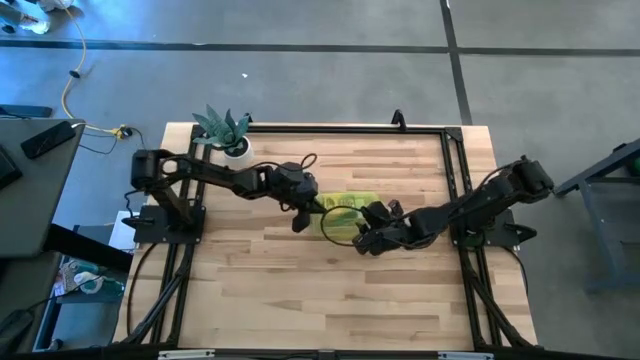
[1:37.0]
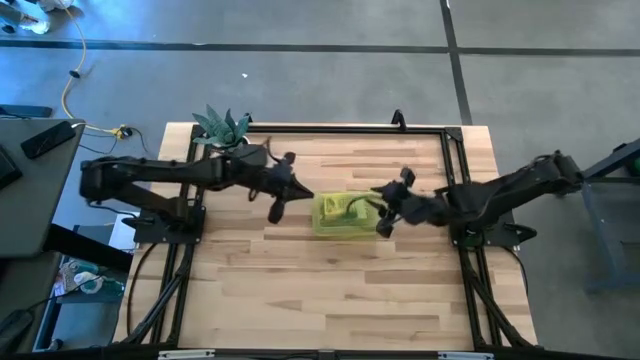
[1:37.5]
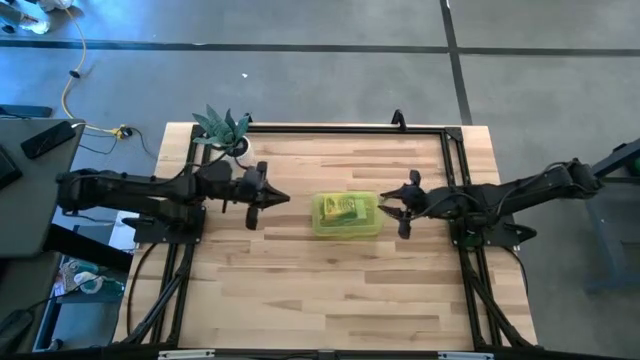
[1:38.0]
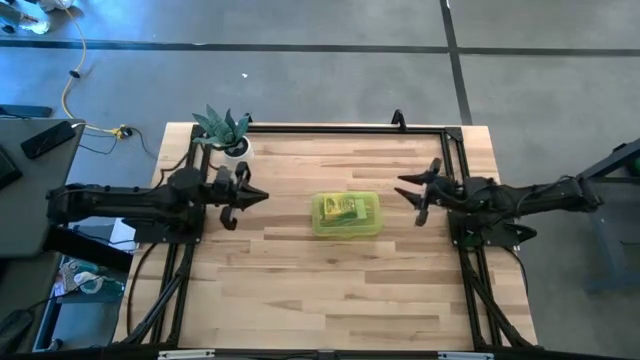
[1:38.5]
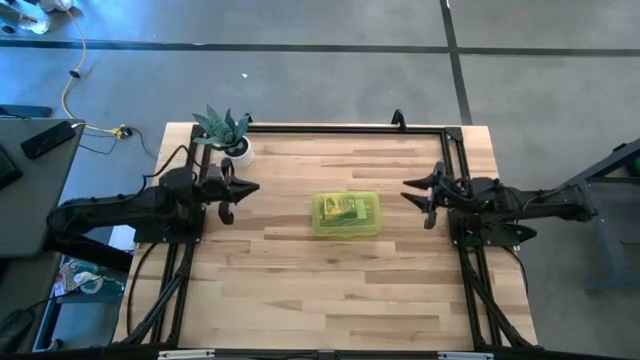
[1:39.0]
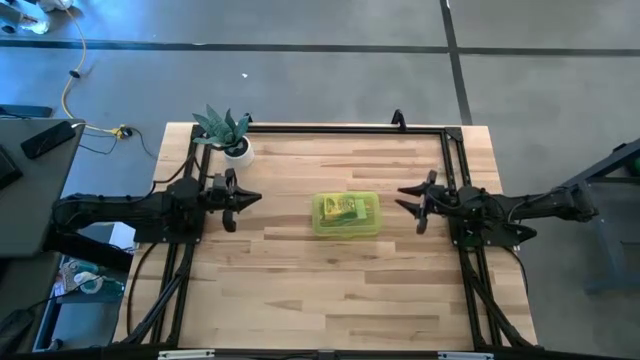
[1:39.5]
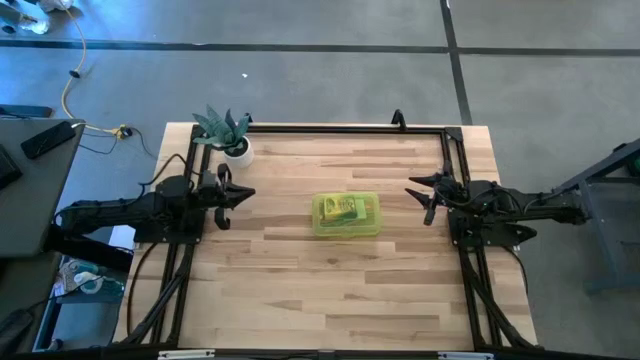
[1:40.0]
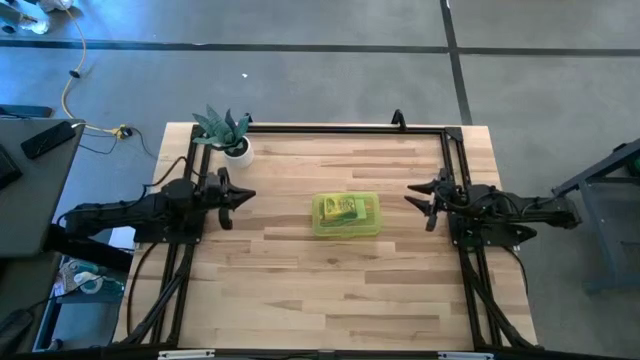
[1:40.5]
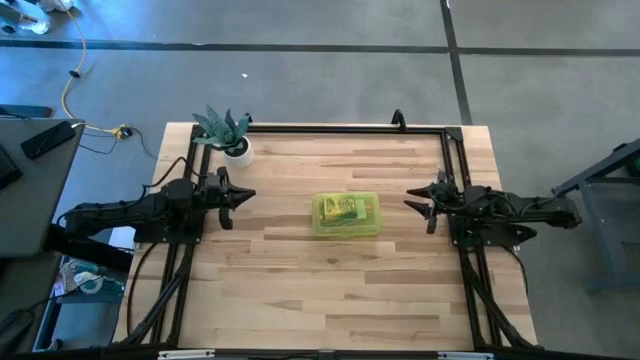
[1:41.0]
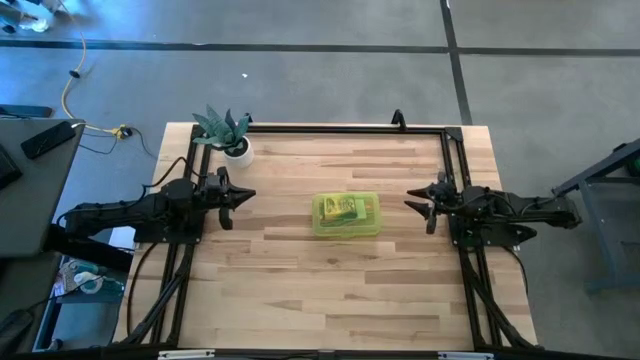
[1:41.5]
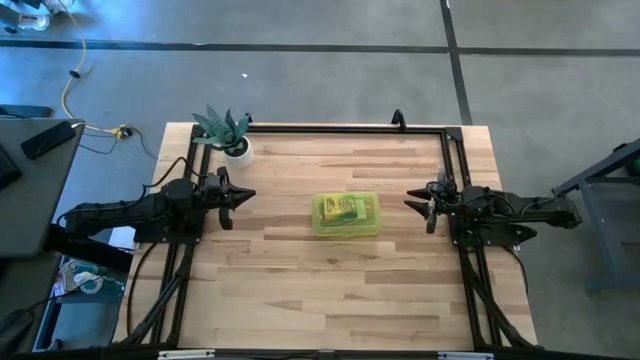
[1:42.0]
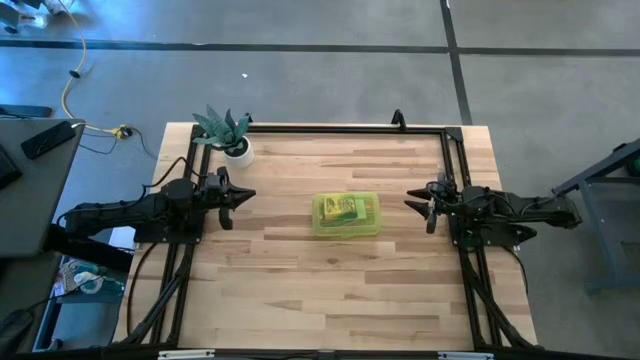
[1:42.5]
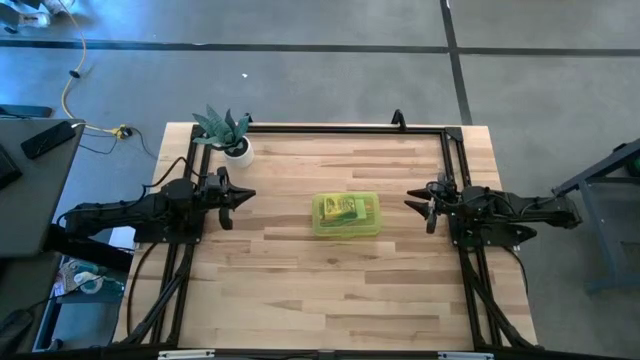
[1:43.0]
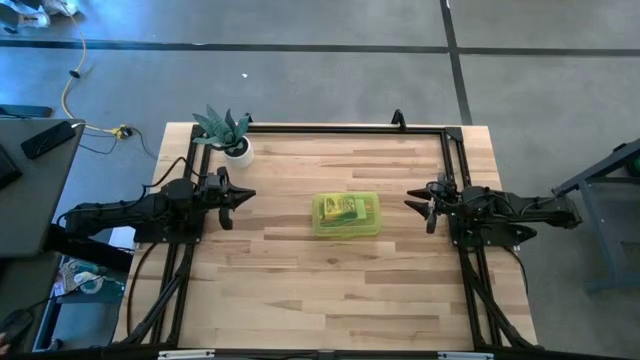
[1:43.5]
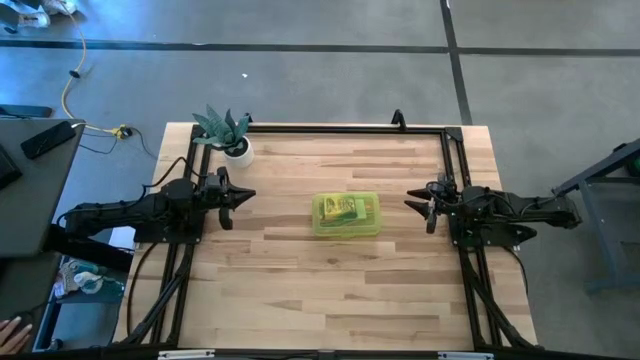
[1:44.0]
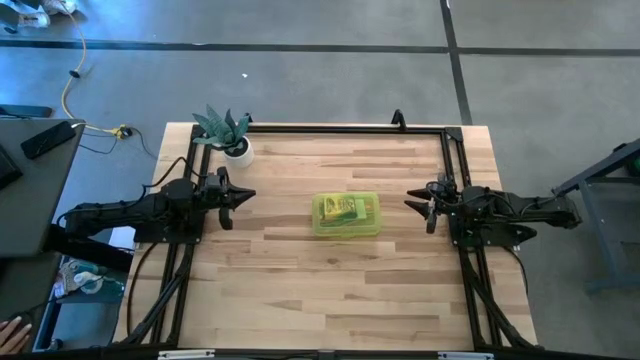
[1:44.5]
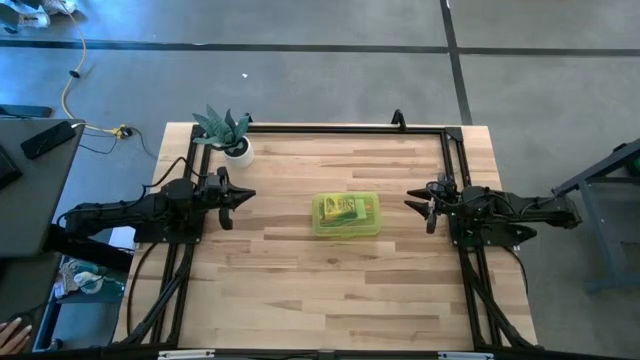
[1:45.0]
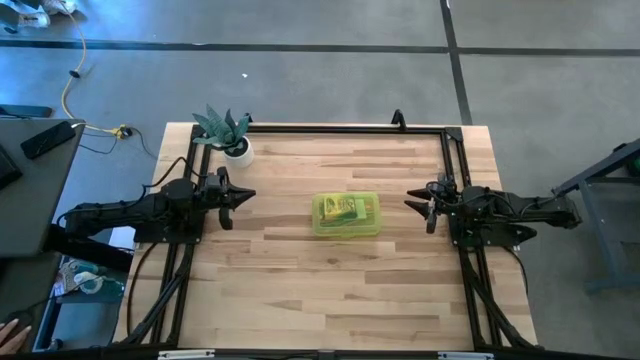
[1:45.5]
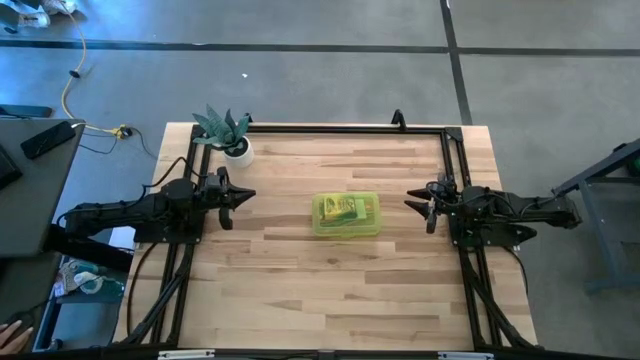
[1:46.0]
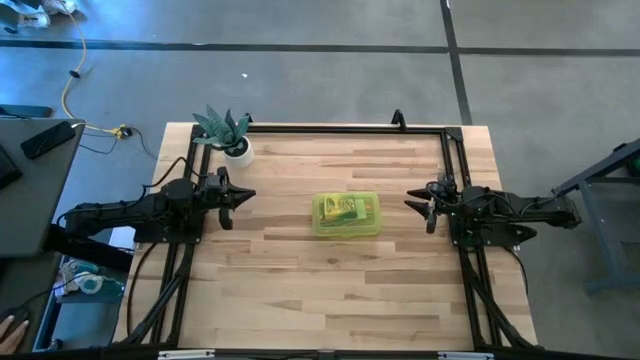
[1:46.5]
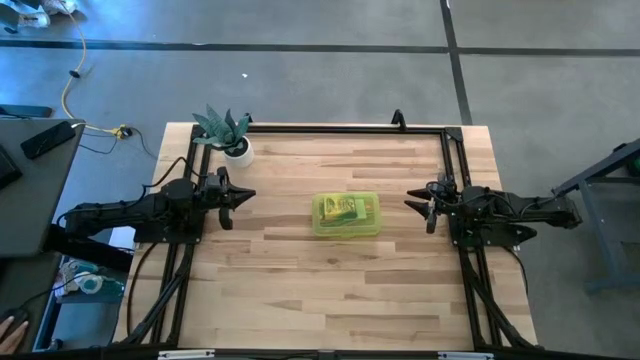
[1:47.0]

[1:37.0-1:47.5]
Task: Pack school essentials
Return to Home Position

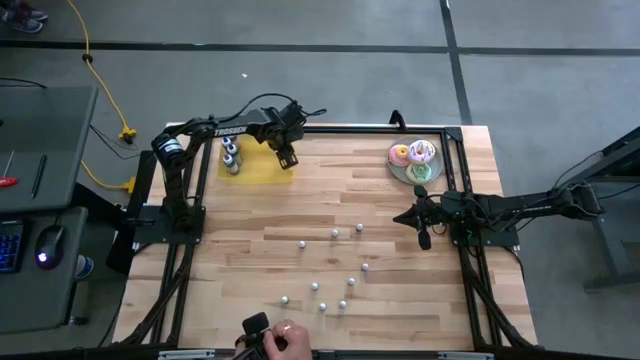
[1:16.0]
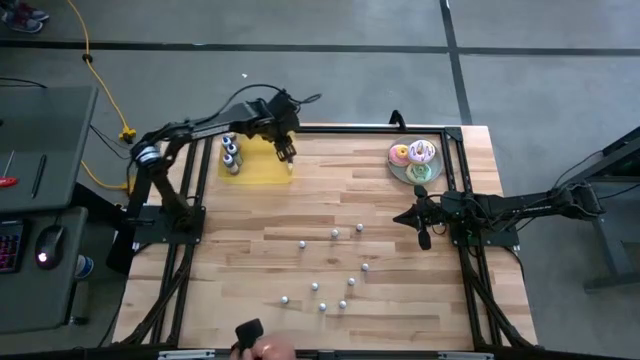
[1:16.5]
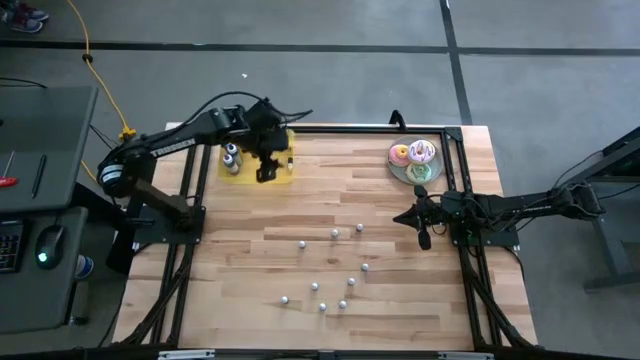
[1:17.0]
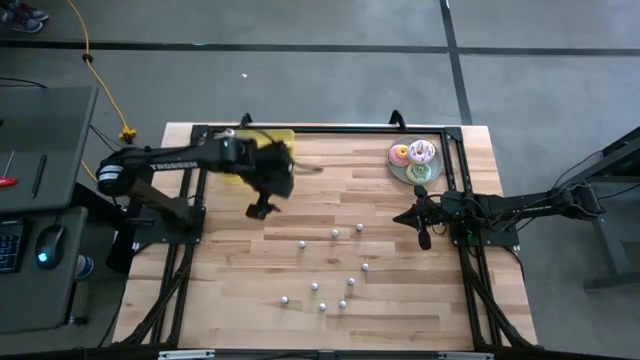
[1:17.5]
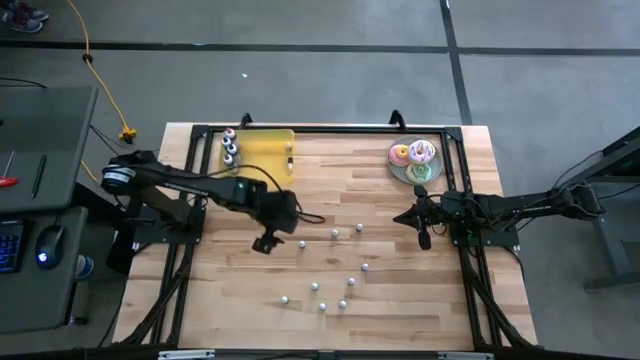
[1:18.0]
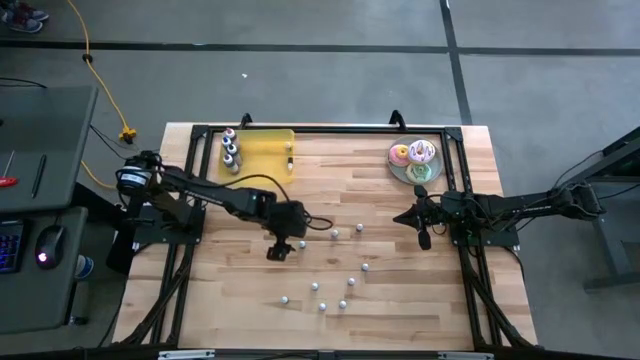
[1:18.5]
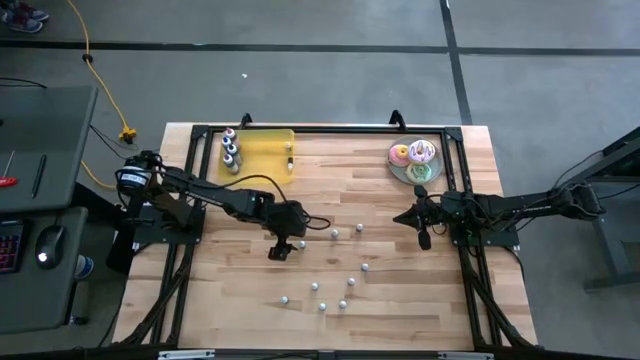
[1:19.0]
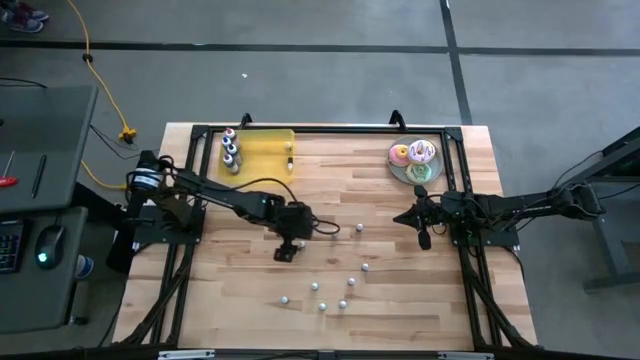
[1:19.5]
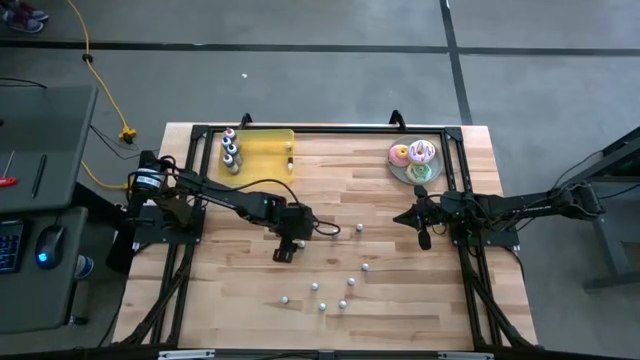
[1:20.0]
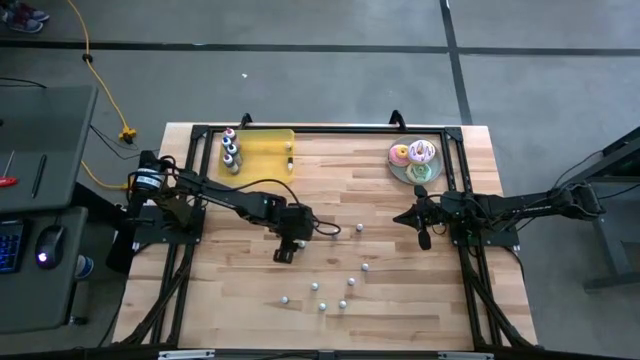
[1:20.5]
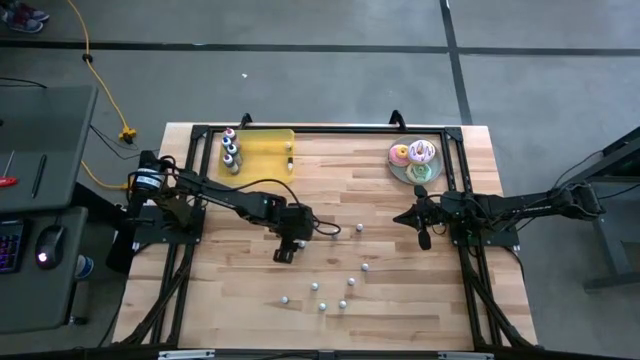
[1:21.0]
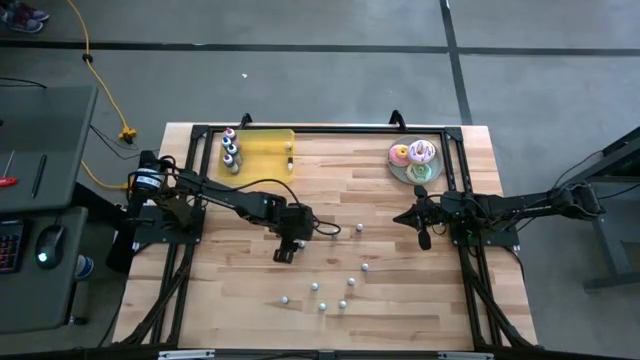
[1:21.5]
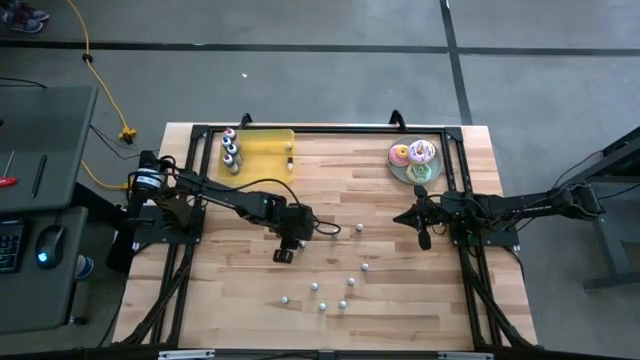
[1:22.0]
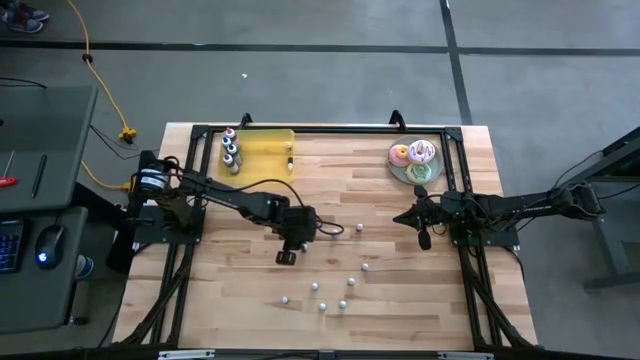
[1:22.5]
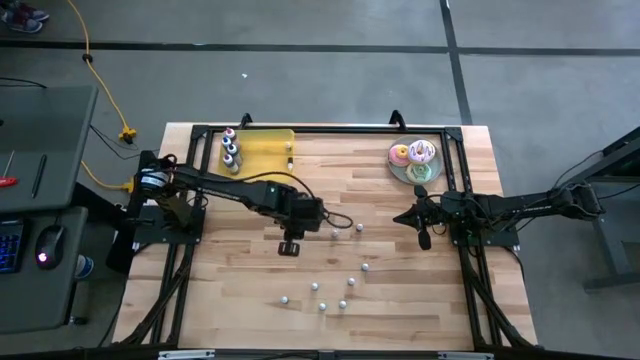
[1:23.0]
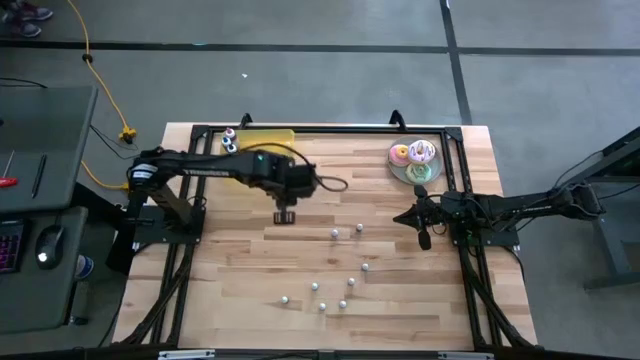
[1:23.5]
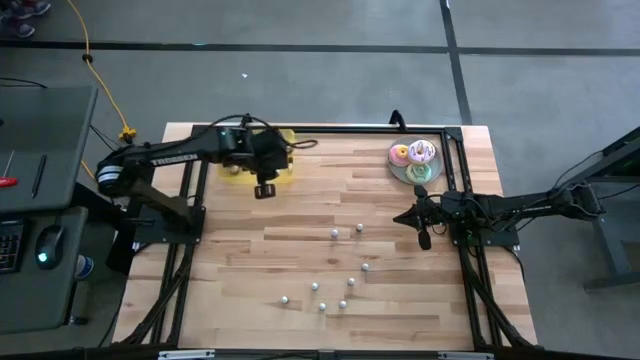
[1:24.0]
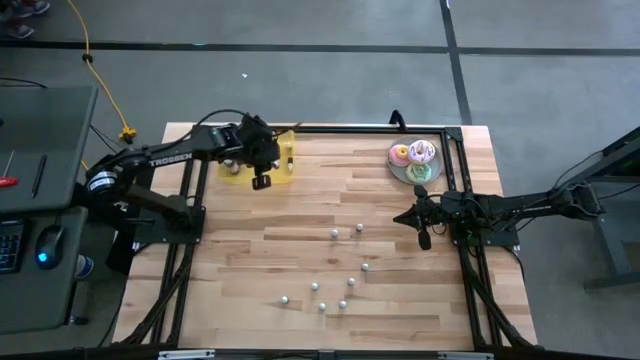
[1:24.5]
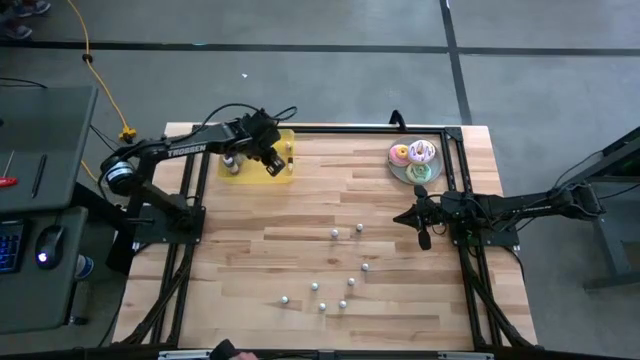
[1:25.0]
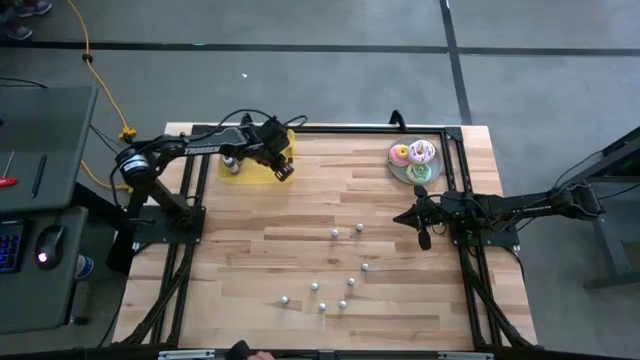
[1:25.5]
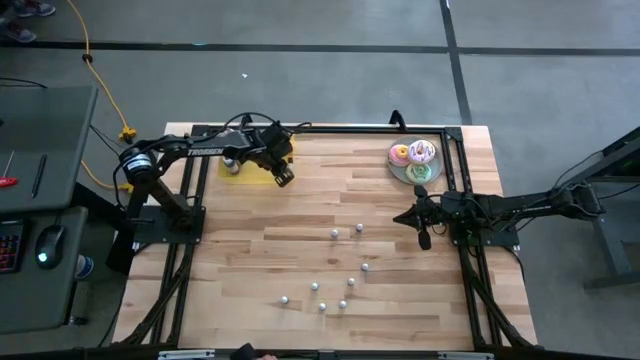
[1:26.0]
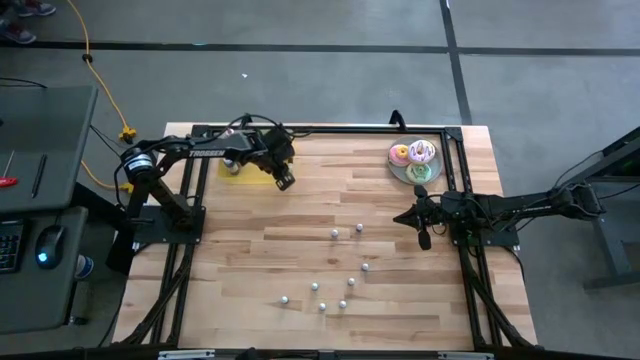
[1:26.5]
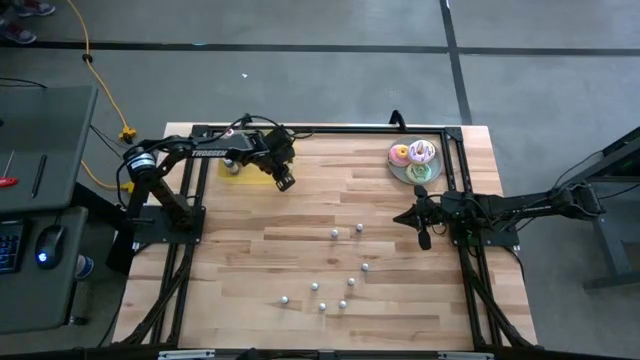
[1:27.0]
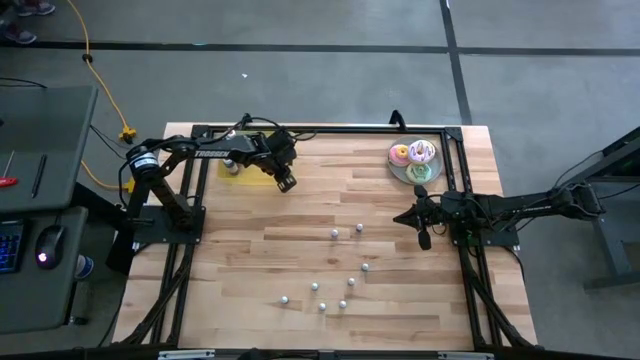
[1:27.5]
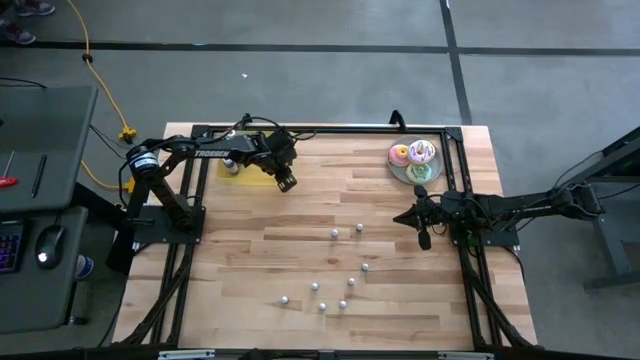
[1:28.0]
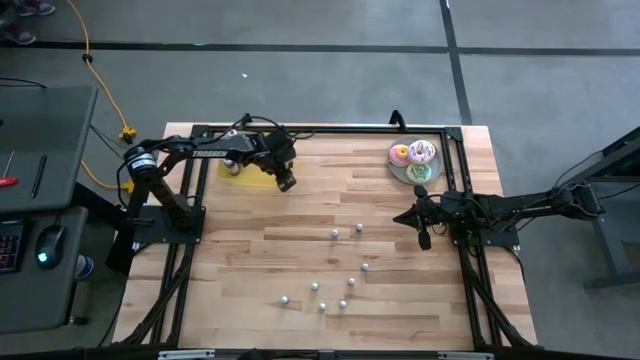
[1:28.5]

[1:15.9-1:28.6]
Task: Pick & Place food coloring
Put the small brown food coloring bottle into the yellow bin
